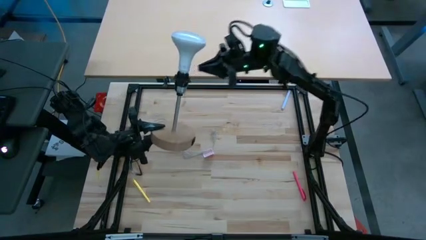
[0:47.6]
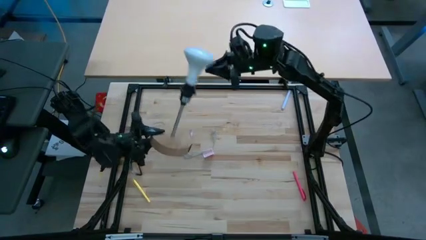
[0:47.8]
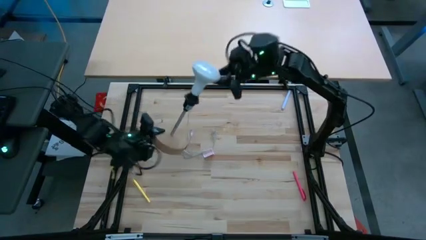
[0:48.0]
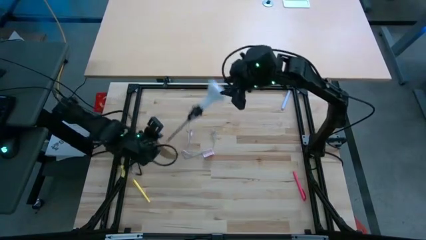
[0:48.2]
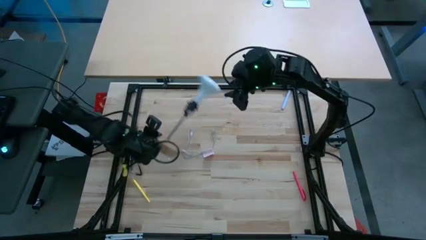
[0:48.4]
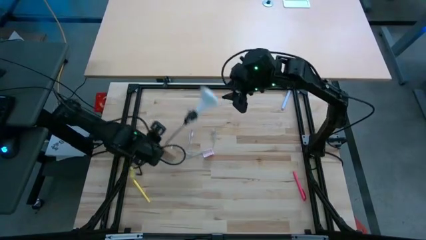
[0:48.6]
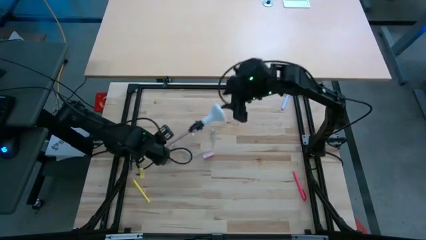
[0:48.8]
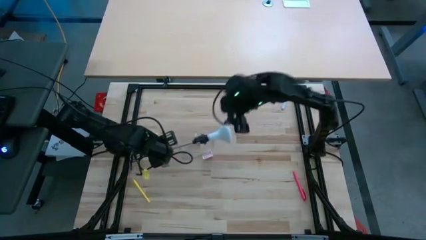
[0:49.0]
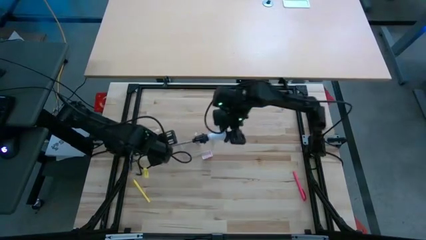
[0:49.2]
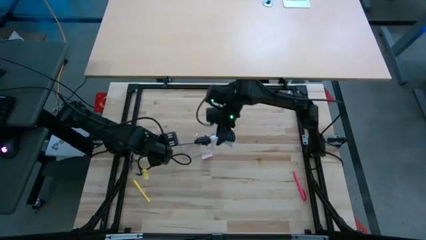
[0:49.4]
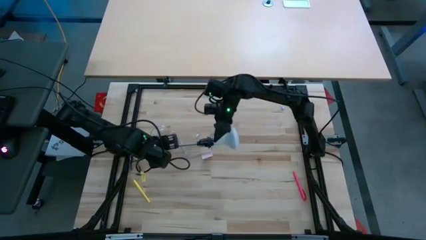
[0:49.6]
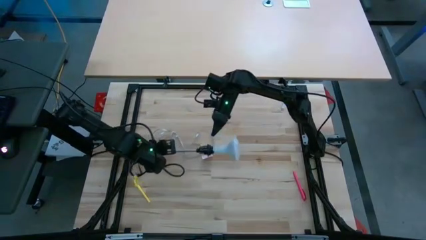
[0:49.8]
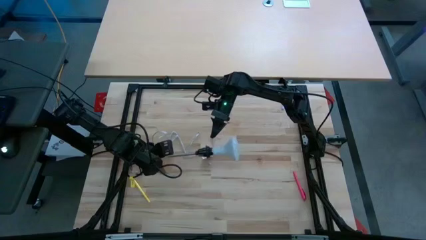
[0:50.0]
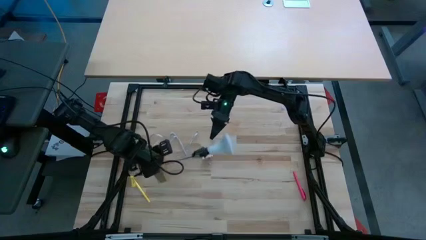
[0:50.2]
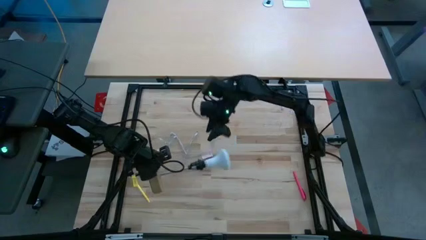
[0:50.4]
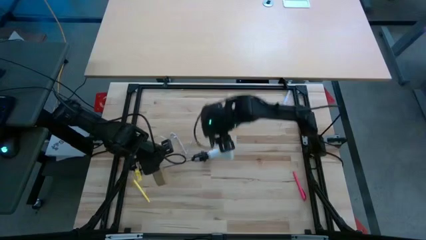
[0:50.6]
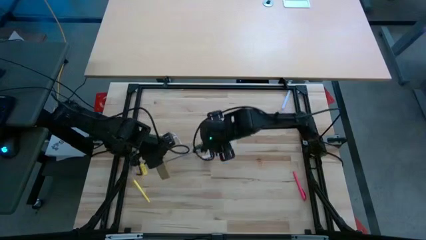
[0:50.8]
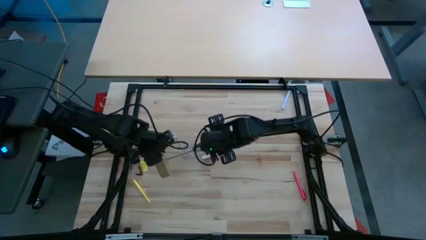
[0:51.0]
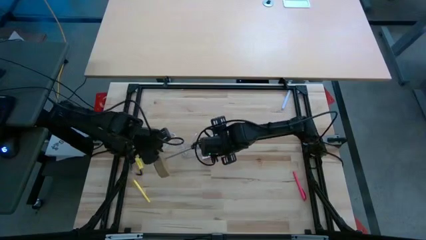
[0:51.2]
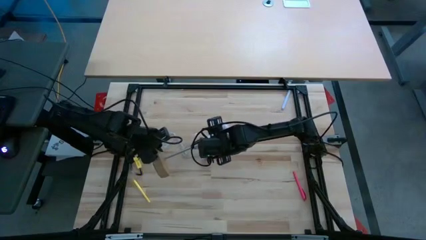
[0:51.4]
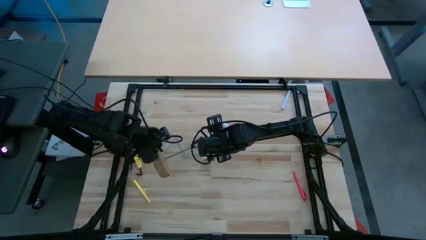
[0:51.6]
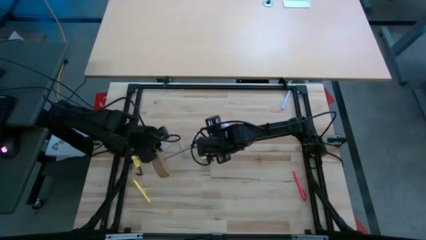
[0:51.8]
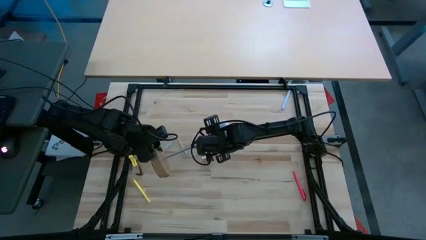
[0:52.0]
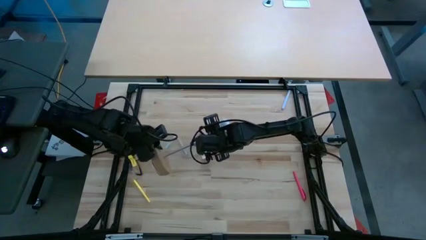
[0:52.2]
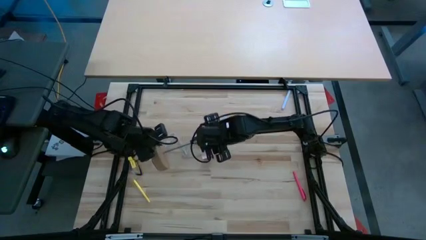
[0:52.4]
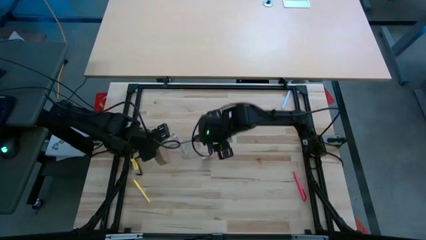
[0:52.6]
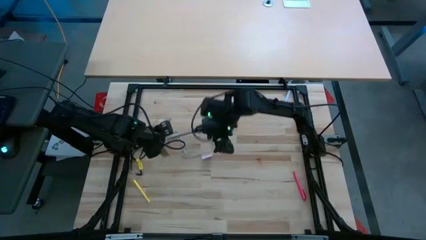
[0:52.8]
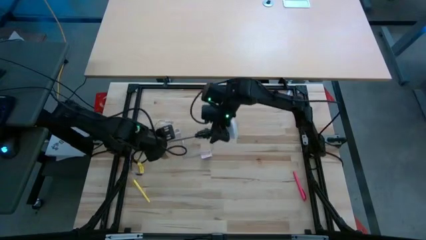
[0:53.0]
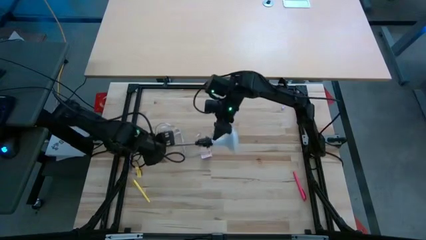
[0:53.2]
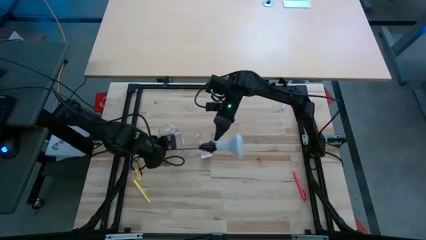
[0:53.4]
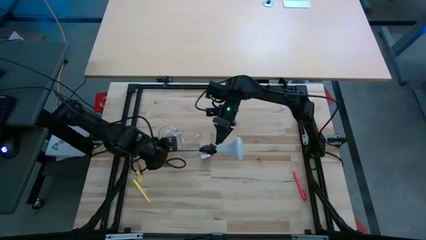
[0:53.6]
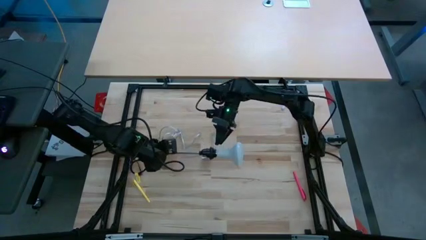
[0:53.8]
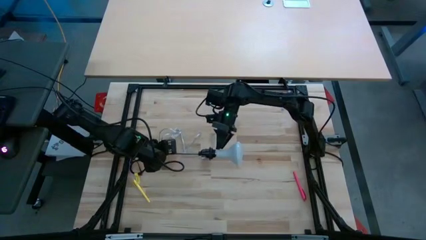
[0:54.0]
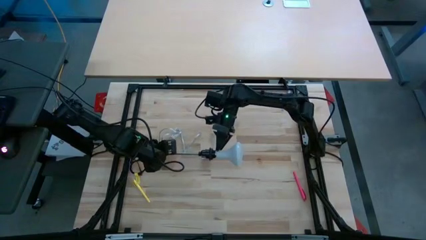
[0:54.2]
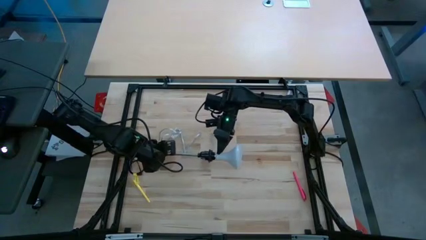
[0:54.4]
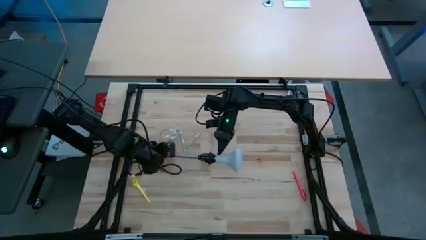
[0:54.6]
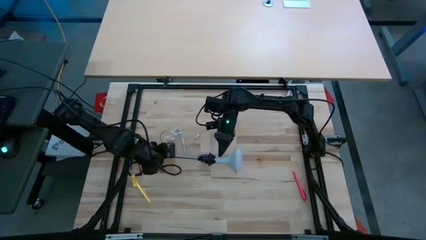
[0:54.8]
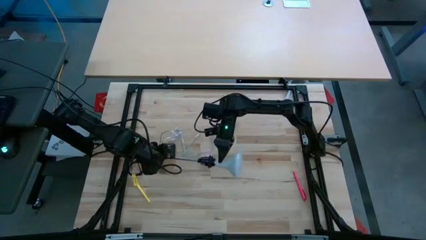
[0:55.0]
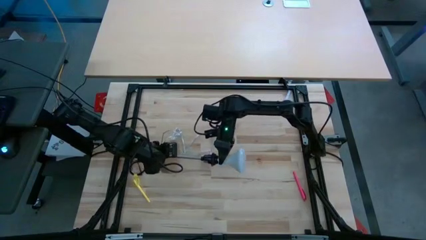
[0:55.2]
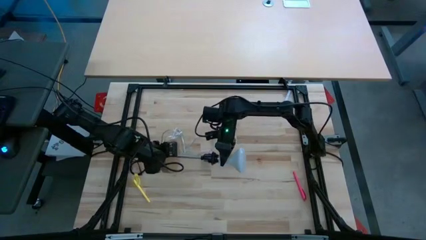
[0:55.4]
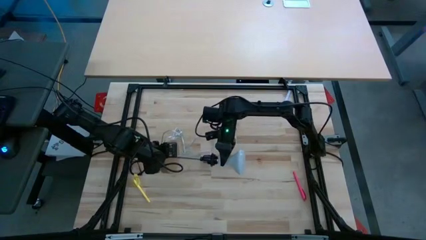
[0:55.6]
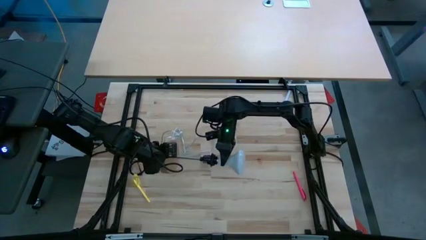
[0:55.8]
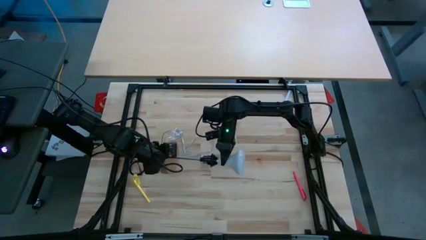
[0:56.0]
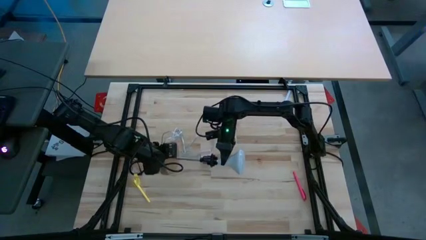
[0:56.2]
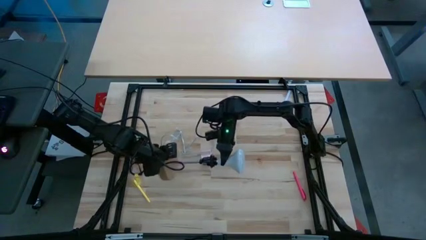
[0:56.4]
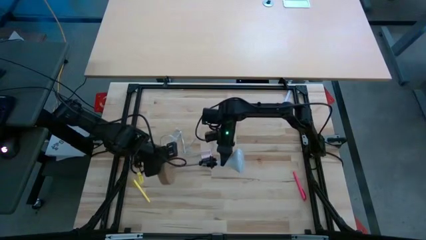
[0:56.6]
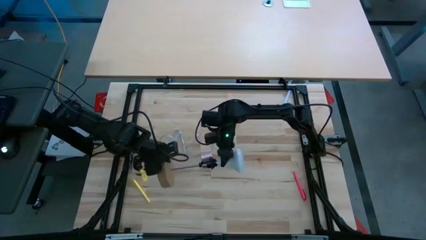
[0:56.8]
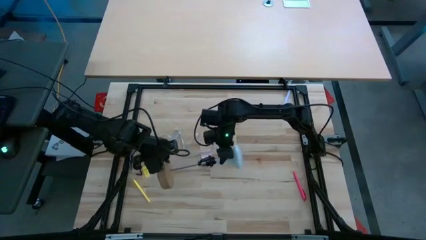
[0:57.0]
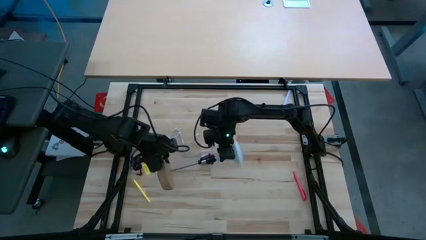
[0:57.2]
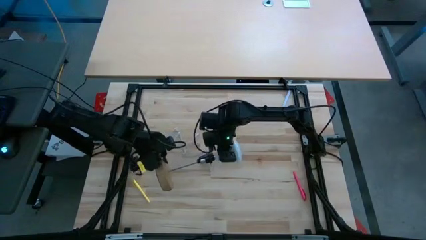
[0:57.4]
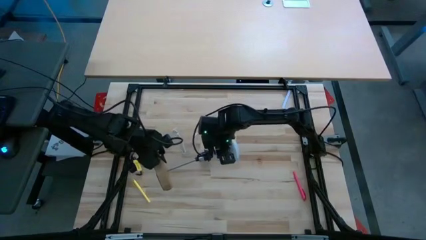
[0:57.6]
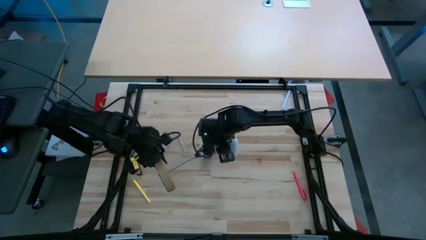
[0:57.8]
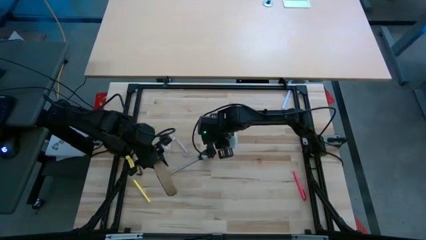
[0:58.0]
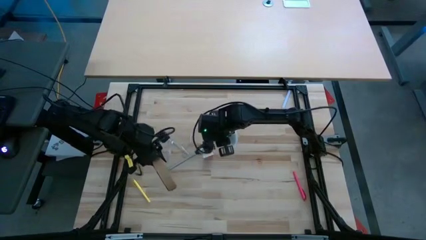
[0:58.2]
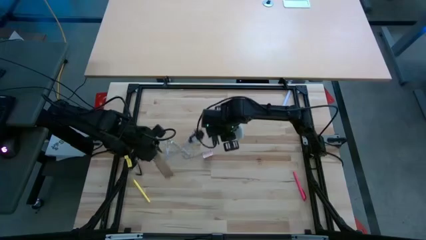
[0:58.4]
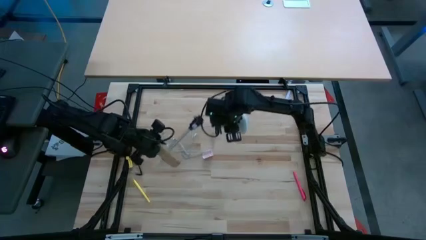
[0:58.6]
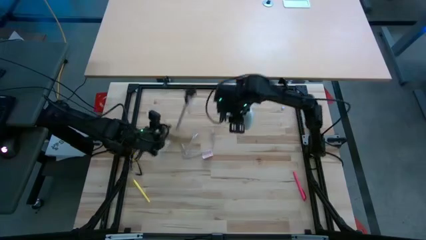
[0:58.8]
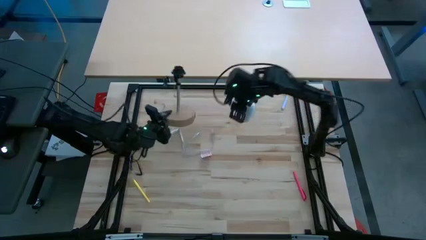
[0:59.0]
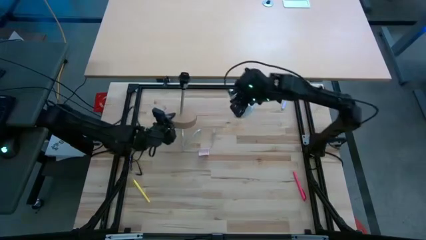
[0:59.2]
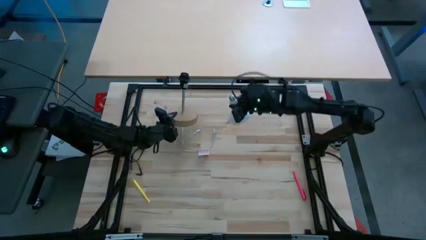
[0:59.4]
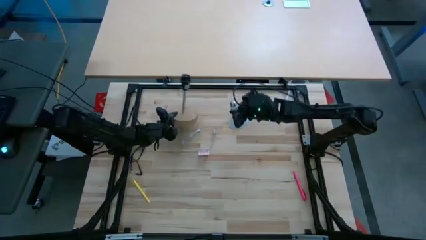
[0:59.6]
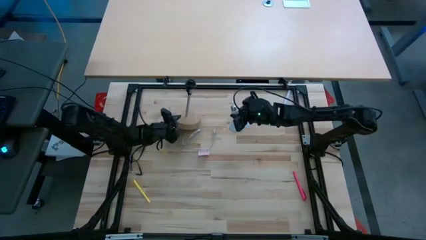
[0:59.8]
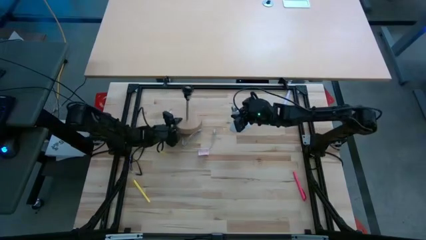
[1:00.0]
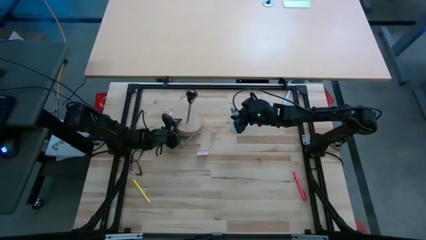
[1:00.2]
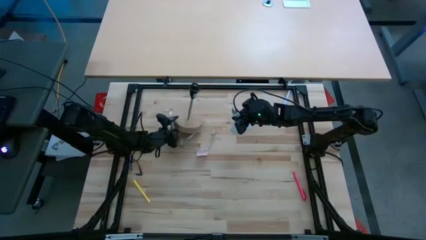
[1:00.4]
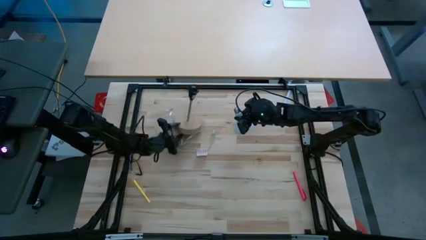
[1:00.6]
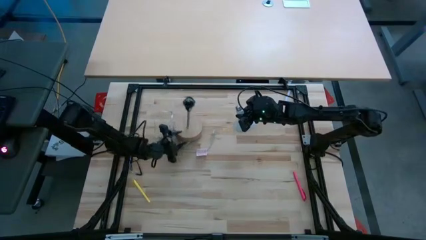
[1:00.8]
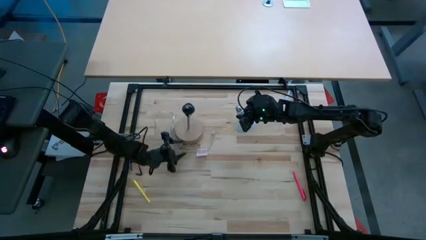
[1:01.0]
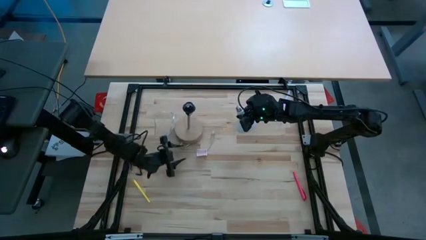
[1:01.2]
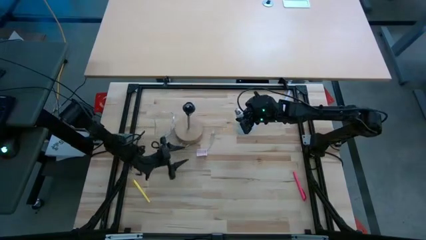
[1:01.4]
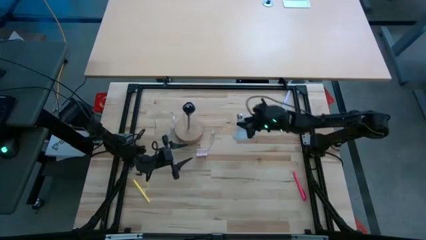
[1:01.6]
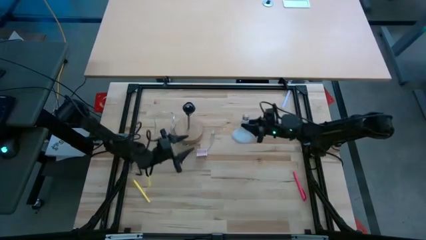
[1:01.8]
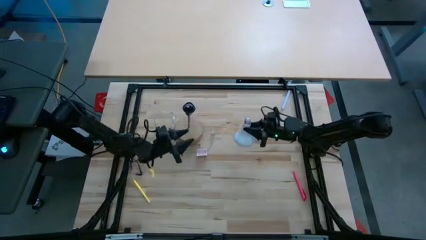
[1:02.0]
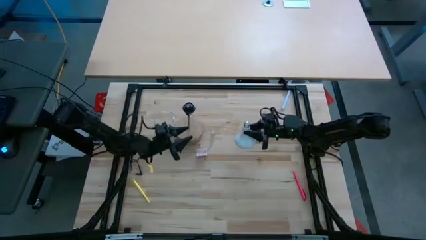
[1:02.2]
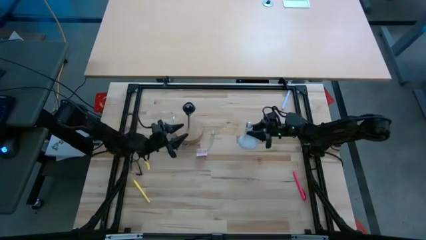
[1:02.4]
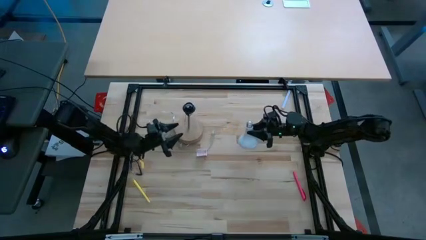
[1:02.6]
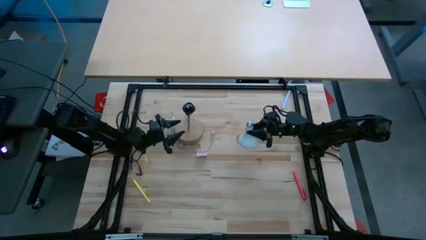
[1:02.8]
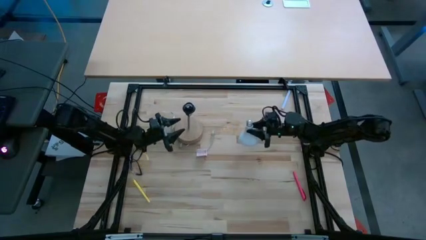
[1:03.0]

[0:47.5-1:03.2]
Task: Screw lightbulb
Remove the light bulb from the lamp holder
